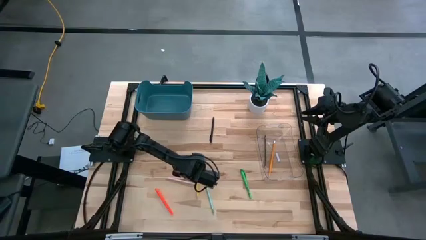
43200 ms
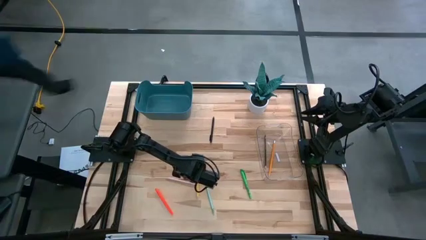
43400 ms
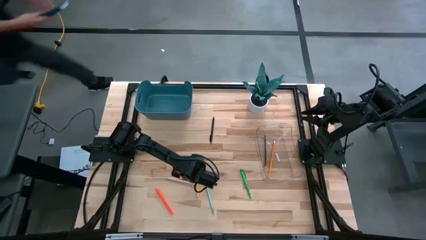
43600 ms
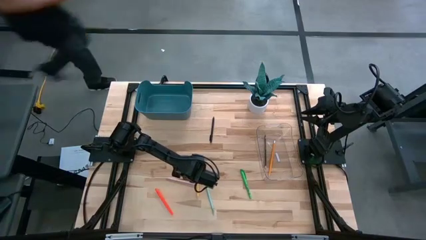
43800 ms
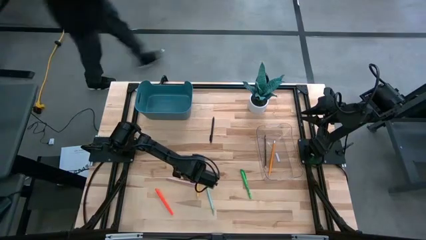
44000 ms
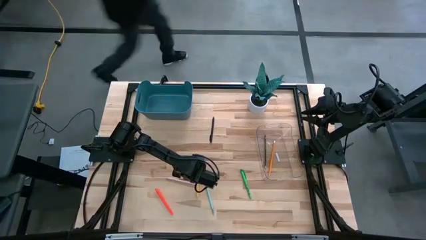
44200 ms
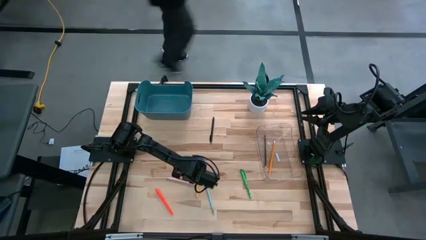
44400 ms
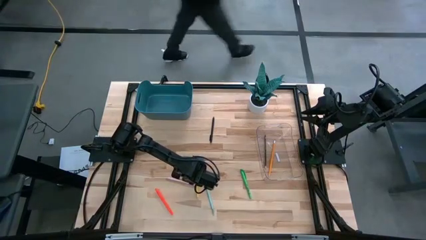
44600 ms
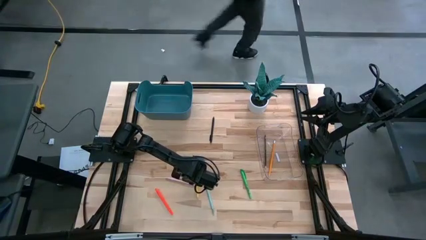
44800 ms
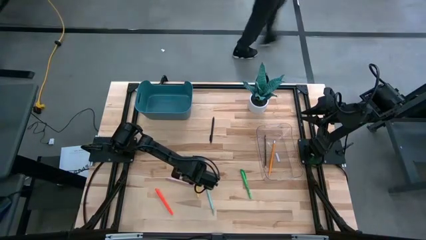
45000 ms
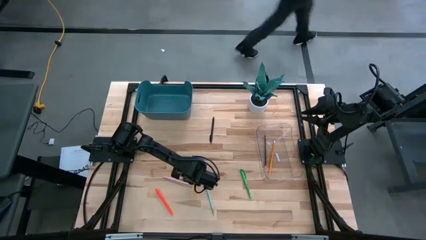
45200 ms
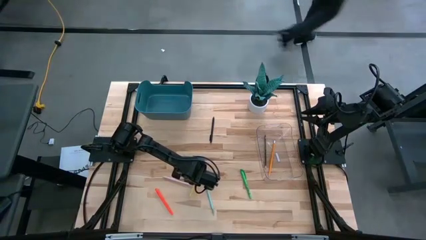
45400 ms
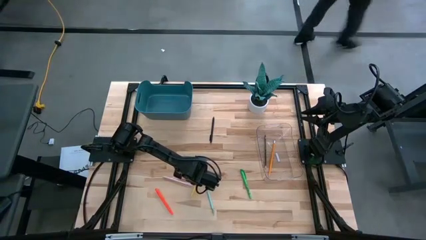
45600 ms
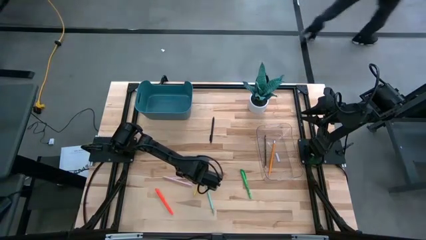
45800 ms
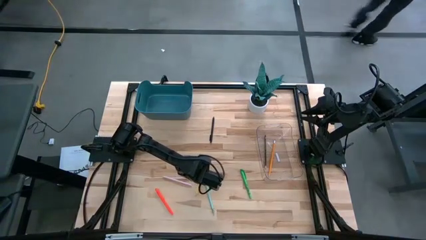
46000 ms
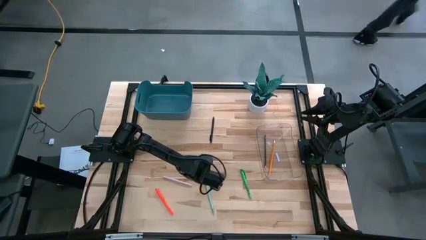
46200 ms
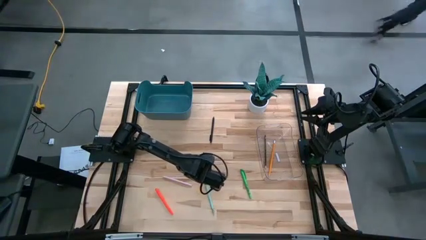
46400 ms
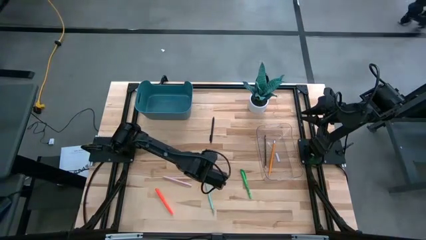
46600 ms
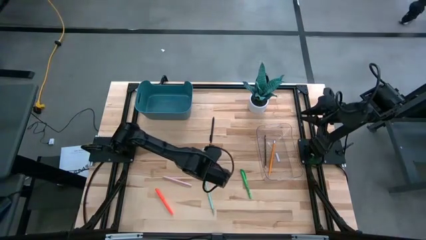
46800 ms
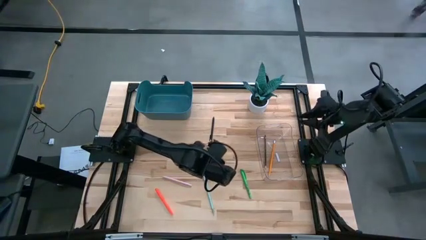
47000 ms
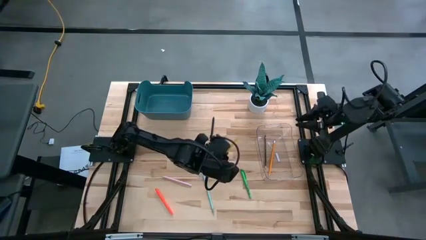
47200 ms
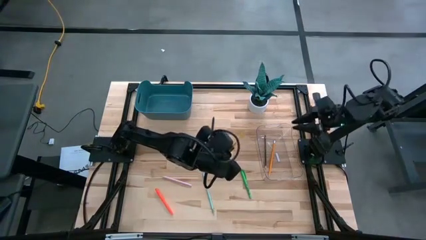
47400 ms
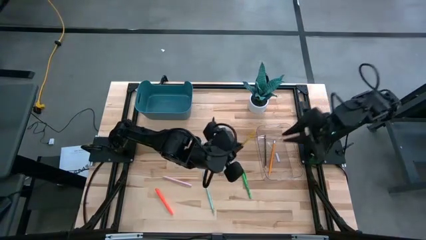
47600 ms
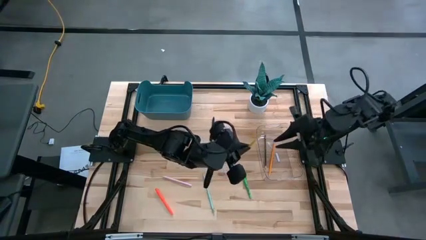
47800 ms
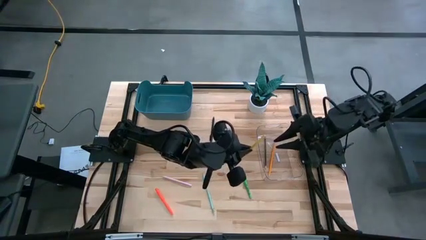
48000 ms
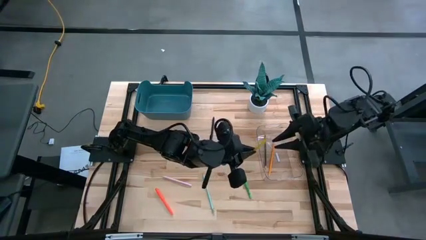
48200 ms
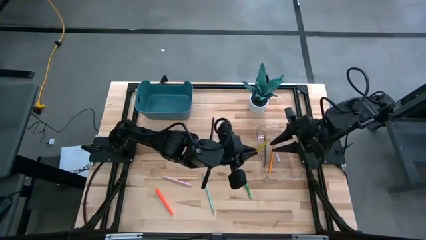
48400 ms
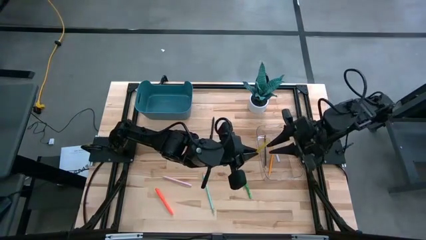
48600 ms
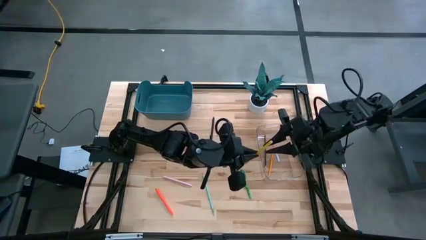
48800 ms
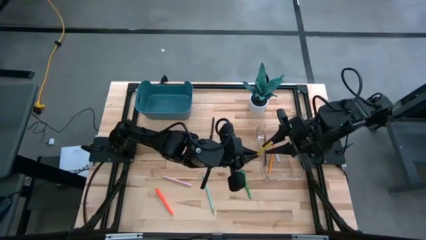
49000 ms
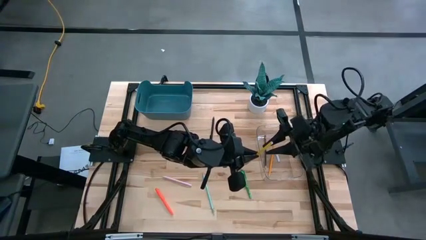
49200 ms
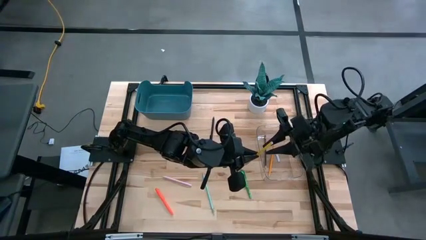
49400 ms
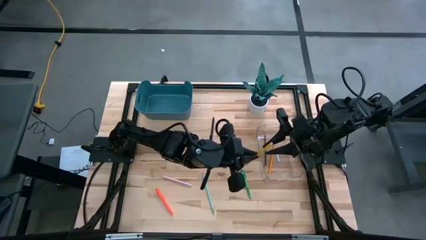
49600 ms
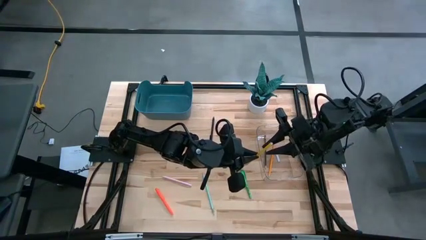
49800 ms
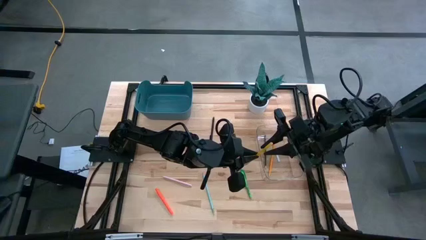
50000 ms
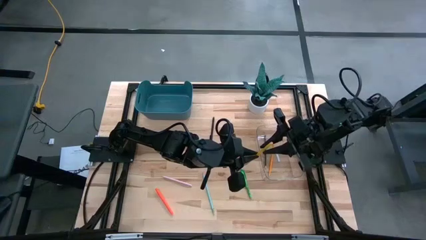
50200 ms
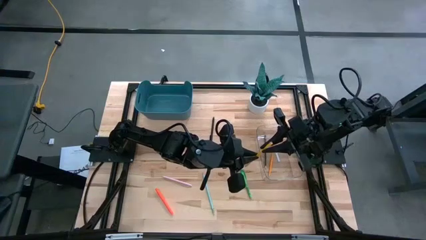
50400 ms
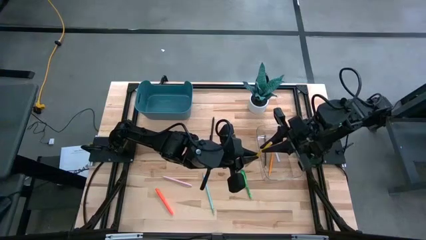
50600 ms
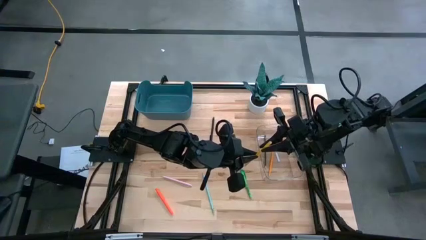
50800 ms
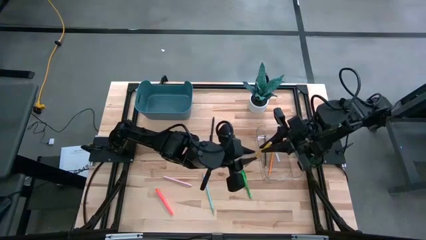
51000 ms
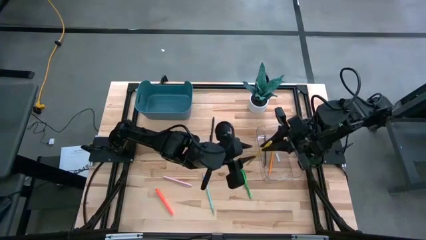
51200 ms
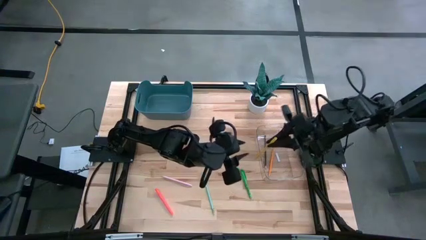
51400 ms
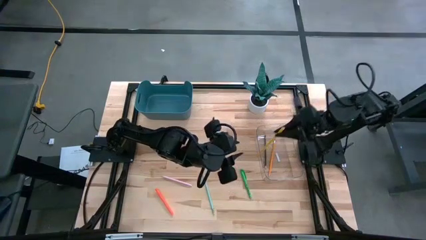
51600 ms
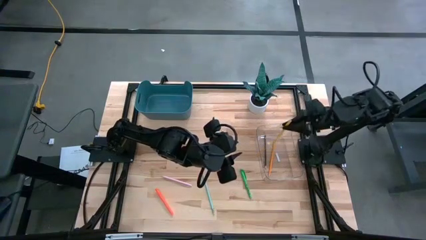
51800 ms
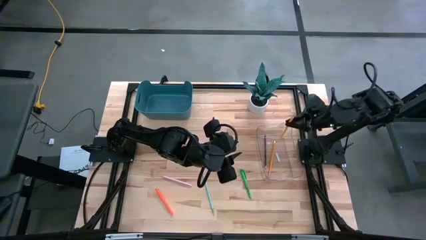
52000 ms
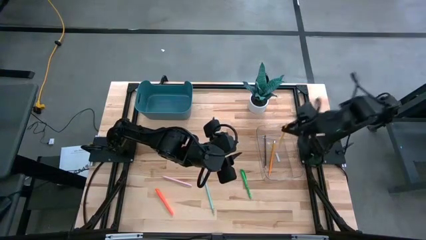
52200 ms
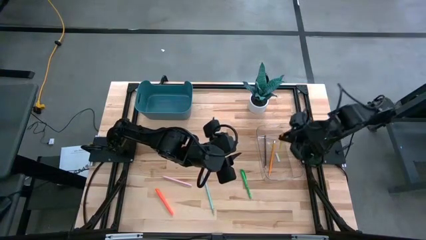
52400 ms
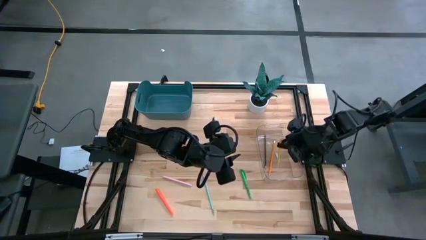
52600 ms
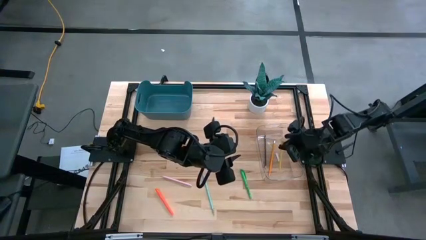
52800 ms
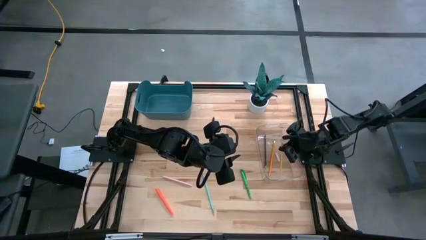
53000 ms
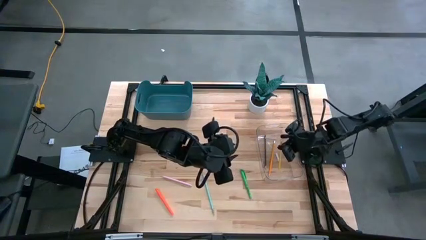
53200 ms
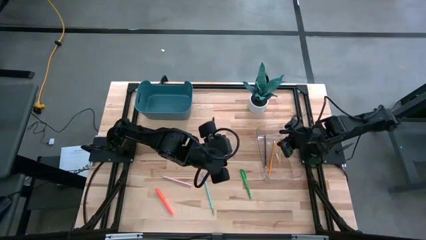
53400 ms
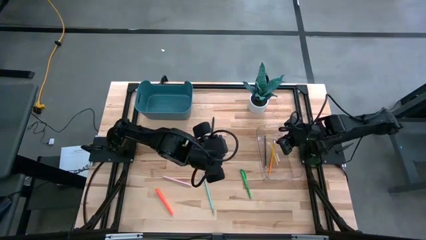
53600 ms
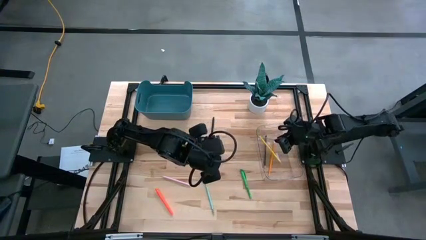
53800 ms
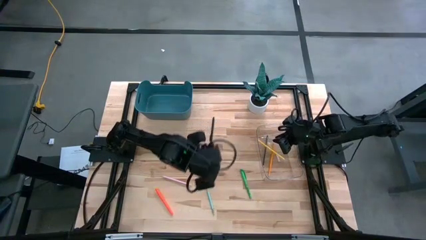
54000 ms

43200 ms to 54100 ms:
Task: Sort pens & pencils
Put the yellow pencil into the transparent bin

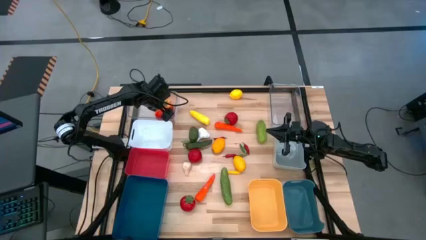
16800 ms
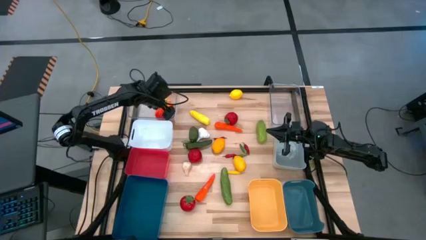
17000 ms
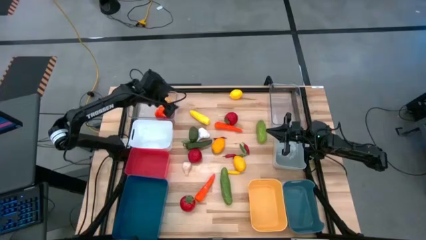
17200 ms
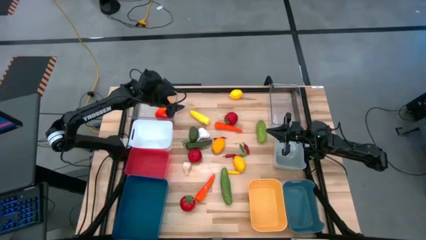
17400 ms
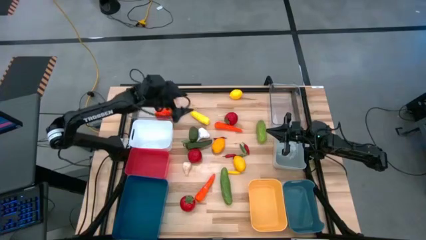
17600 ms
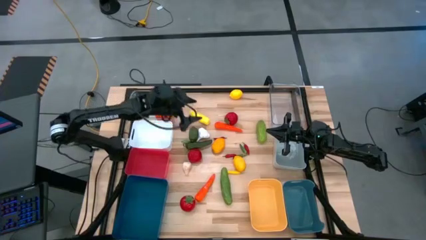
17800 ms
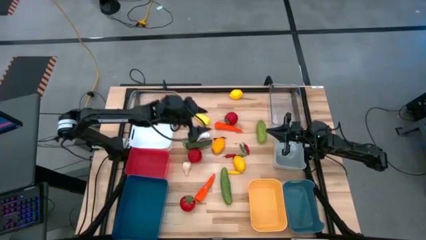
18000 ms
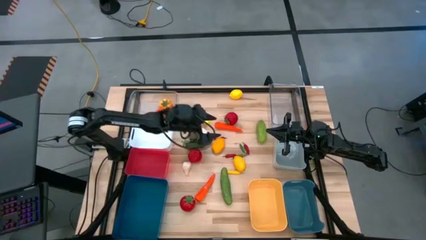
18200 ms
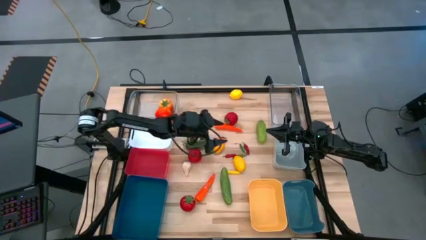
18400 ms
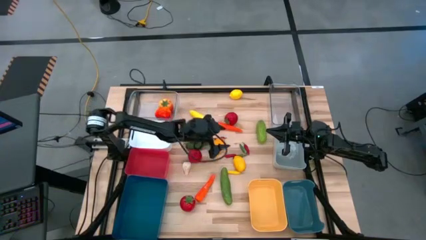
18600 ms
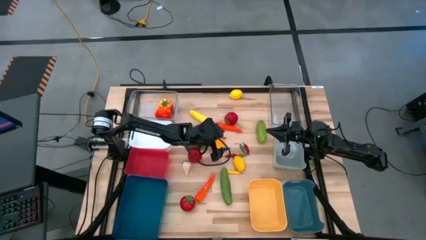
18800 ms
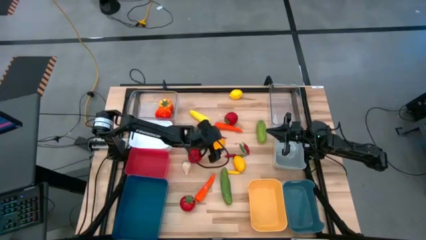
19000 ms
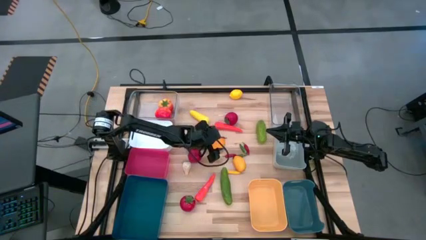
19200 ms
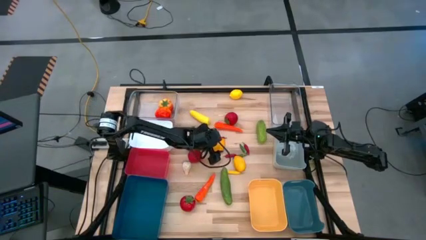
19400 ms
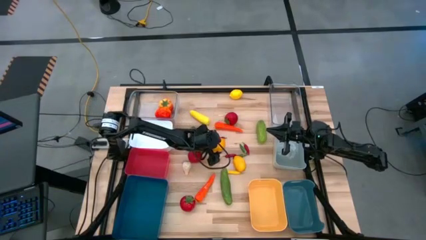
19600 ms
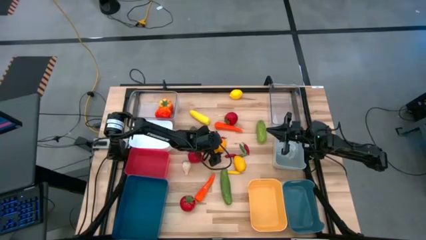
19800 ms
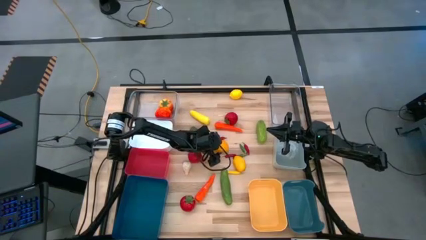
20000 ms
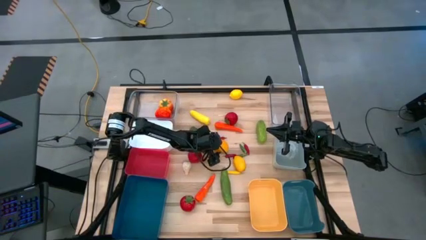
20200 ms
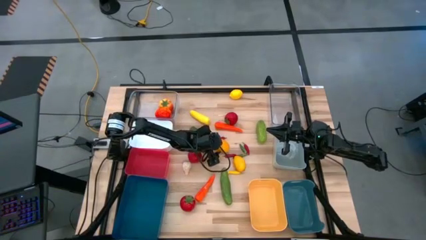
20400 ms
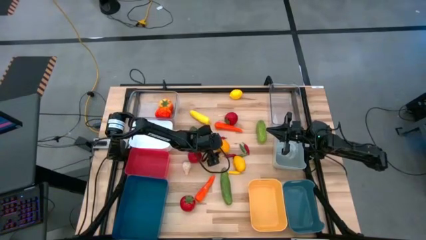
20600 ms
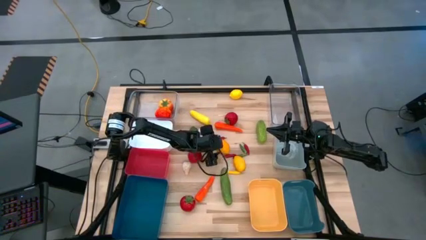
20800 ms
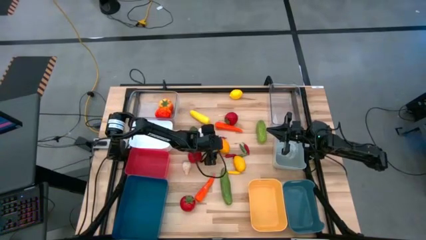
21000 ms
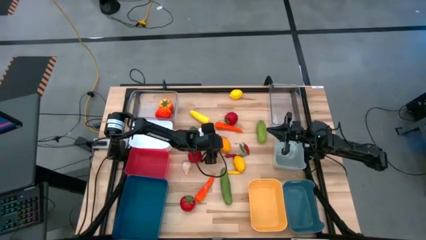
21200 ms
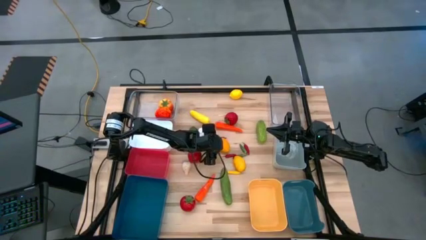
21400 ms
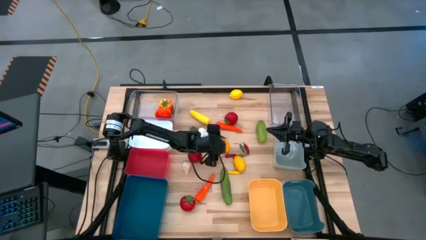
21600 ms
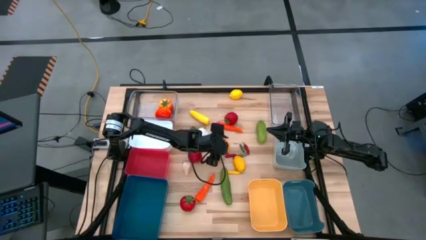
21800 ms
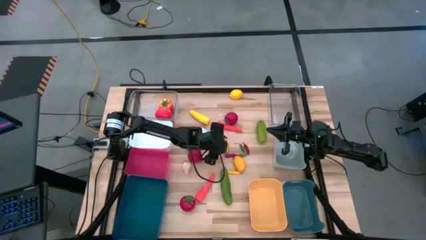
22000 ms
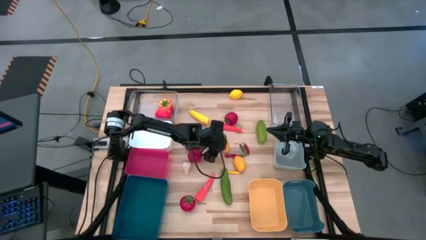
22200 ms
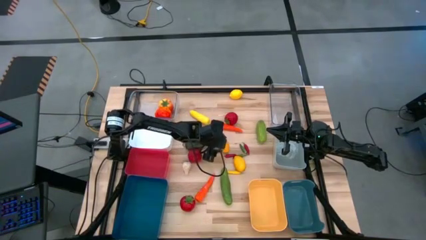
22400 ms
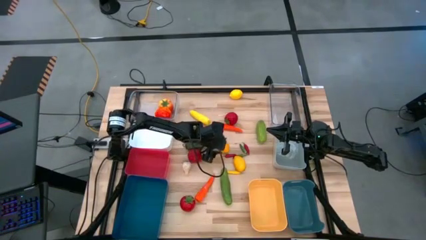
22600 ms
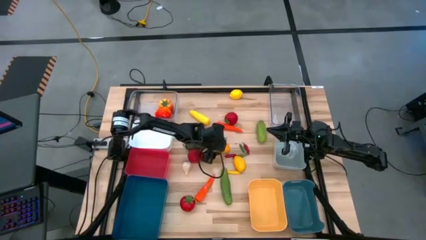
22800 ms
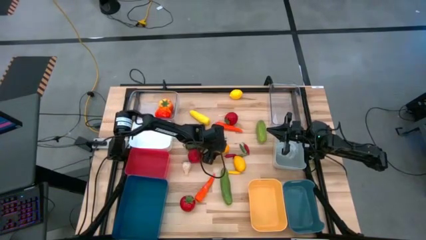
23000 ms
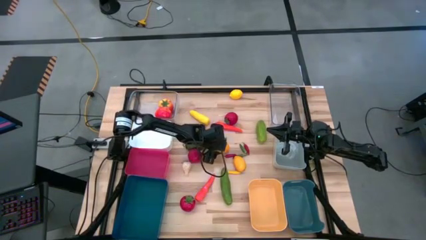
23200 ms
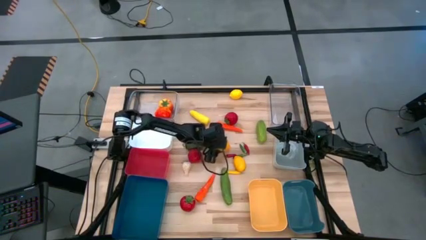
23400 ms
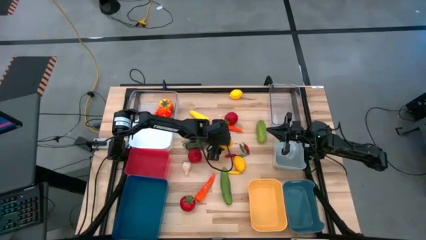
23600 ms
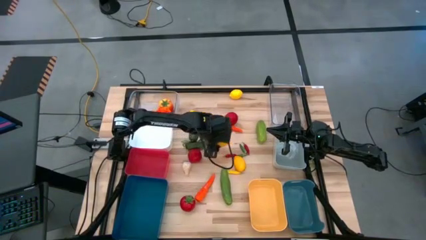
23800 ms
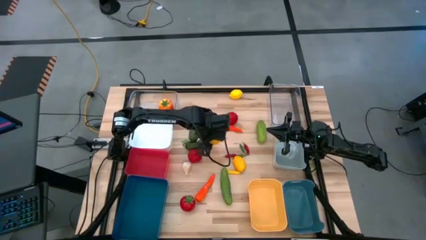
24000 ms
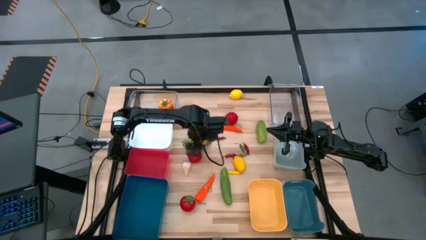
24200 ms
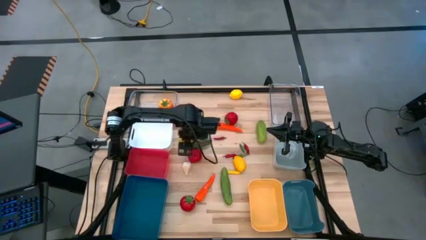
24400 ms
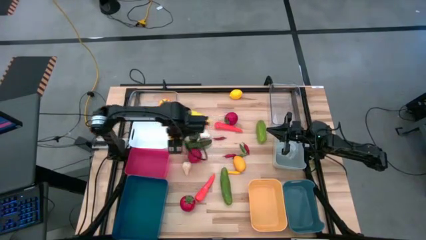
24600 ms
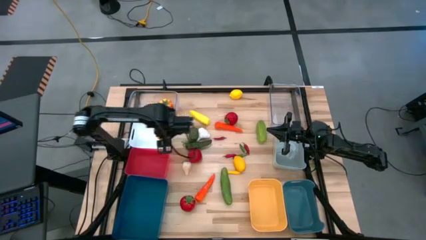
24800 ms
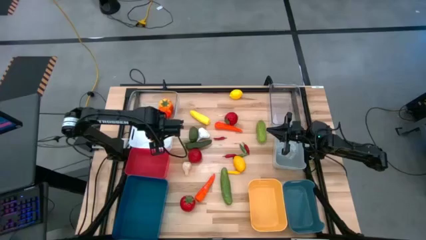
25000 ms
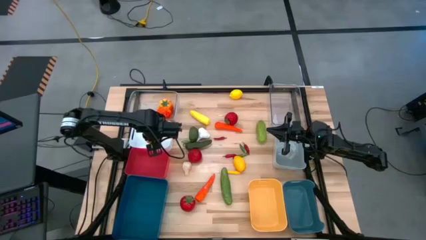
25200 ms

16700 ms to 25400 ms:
Task: Sort produce into baskets
Put the center yellow lemon into the white bin
